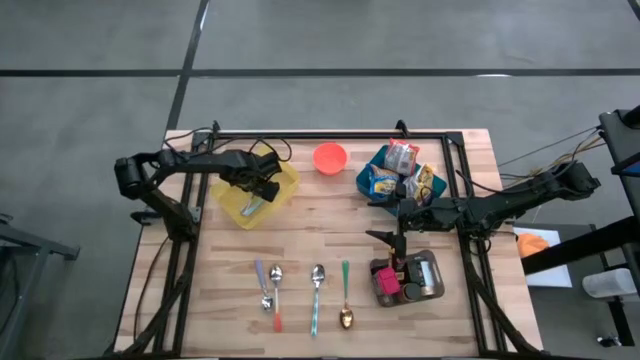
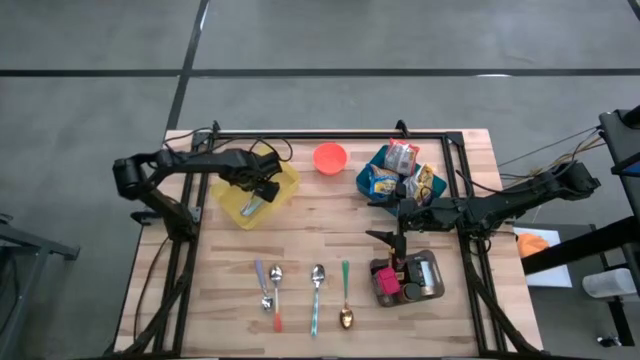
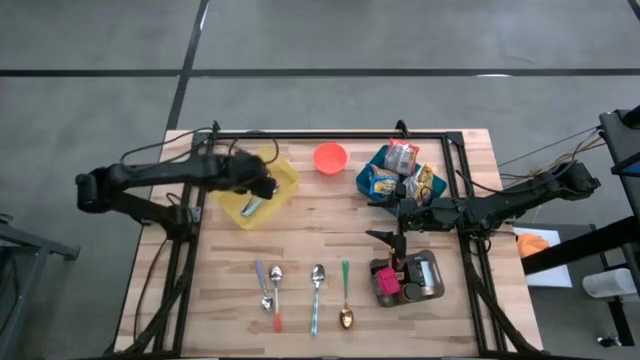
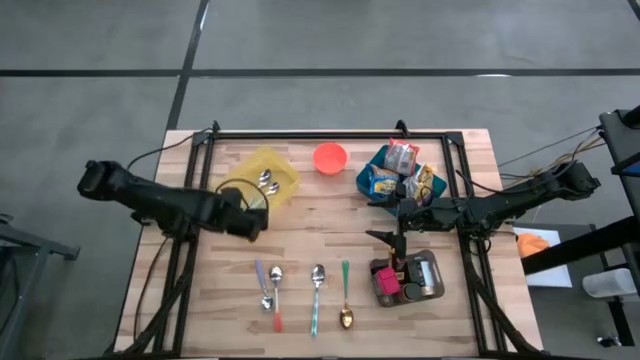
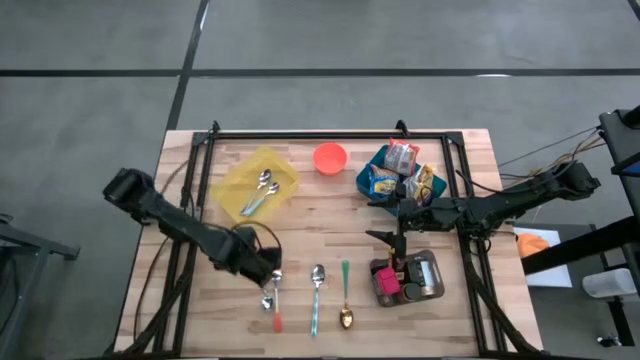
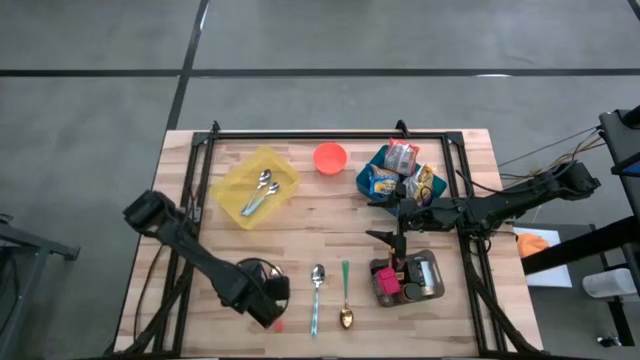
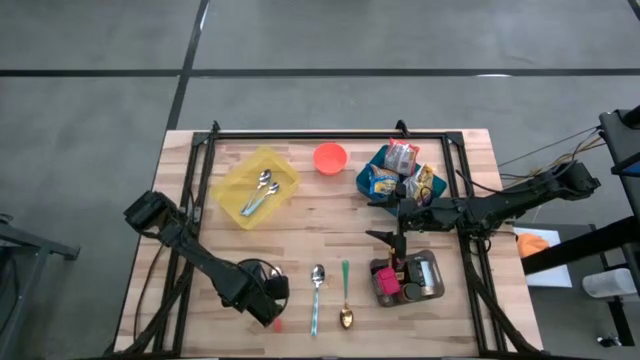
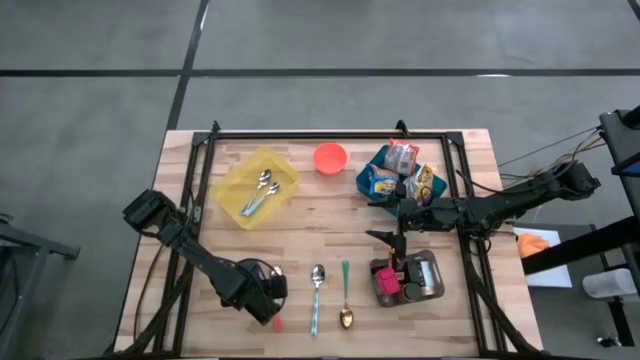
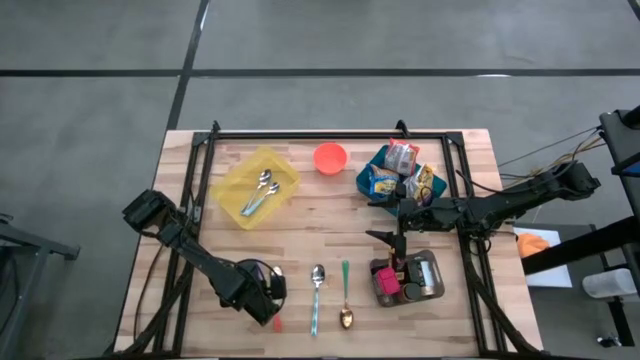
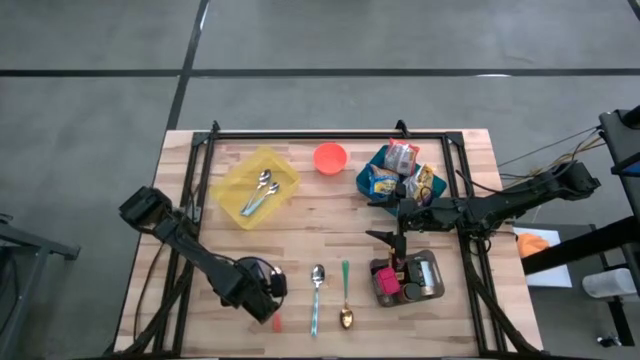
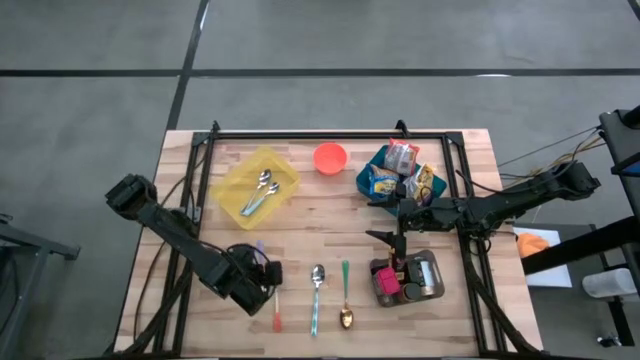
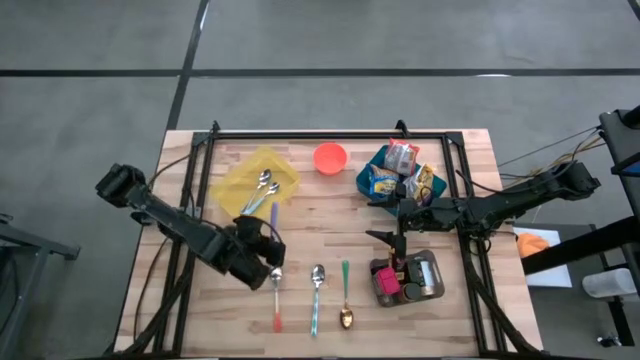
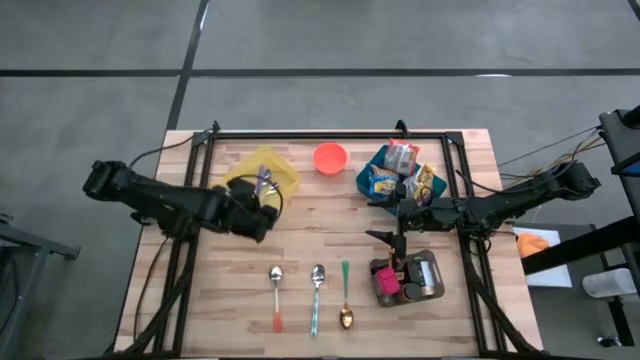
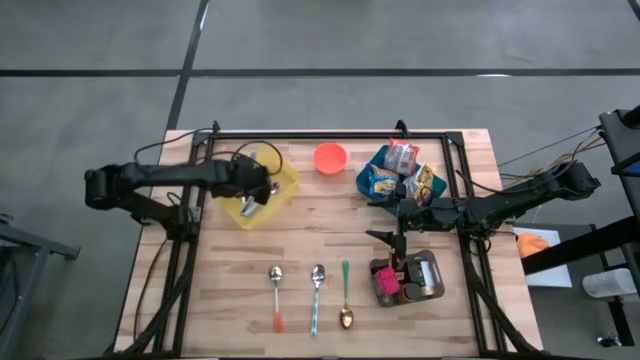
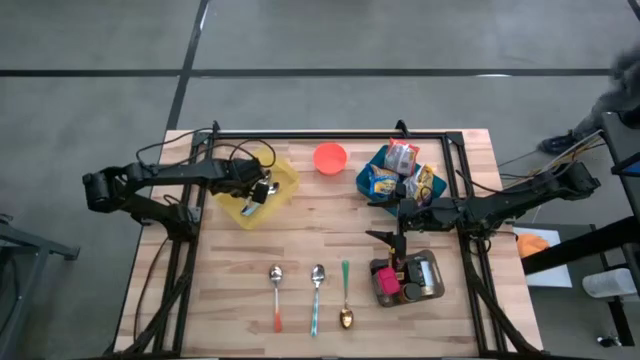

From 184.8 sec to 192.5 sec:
Put the purple spoon into the yellow bin

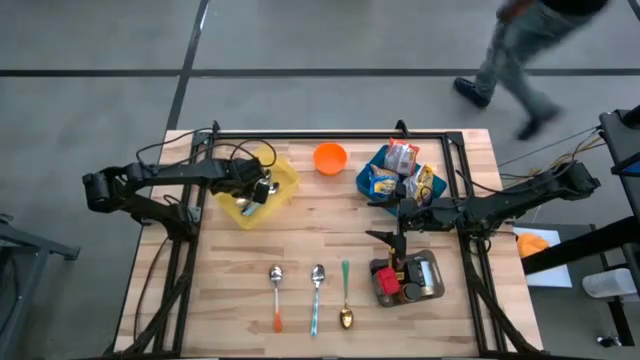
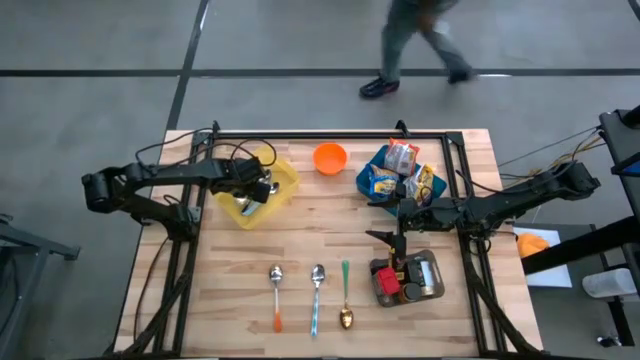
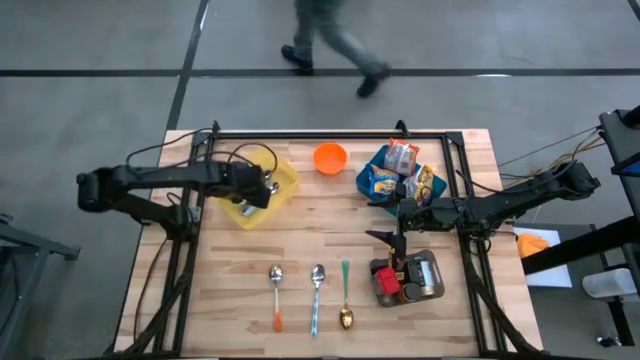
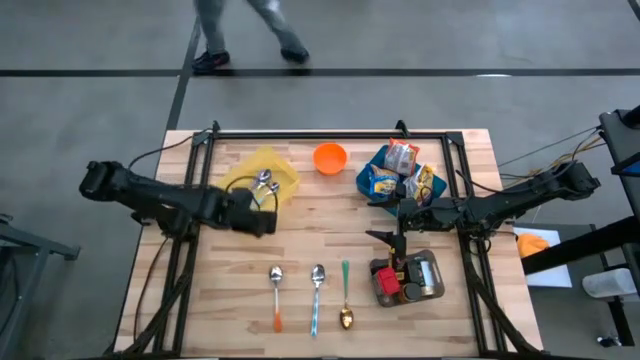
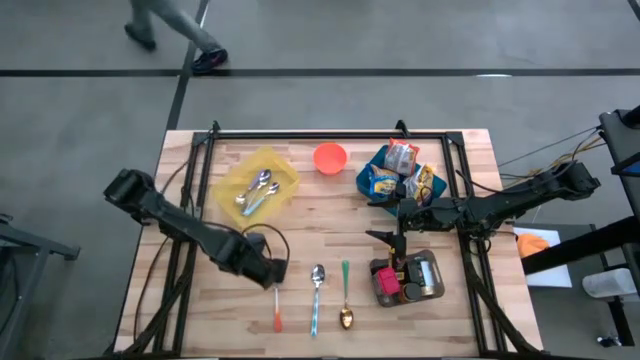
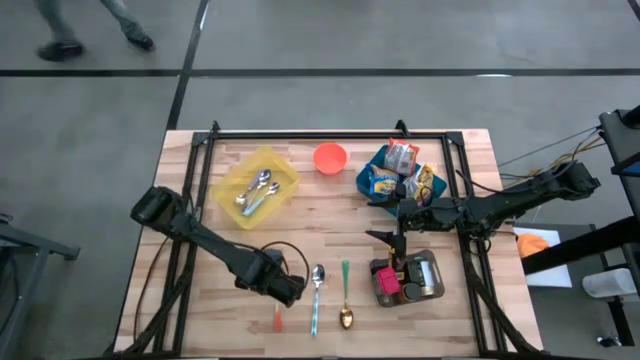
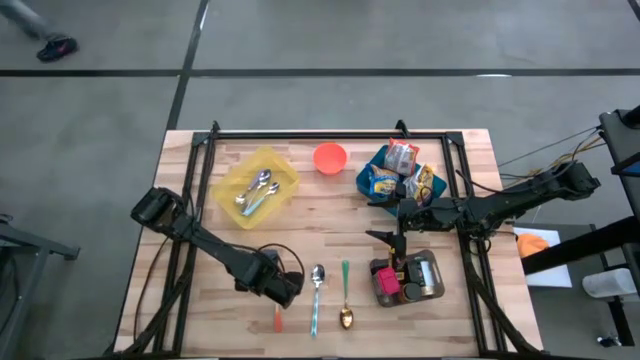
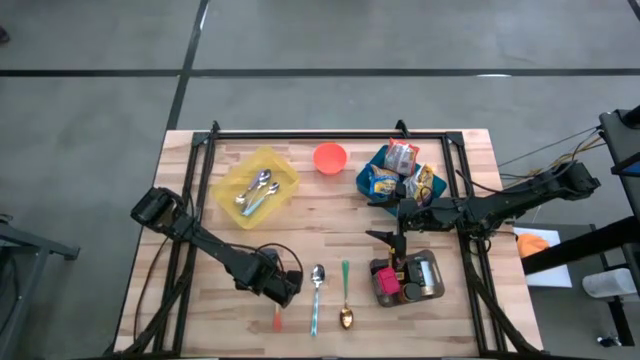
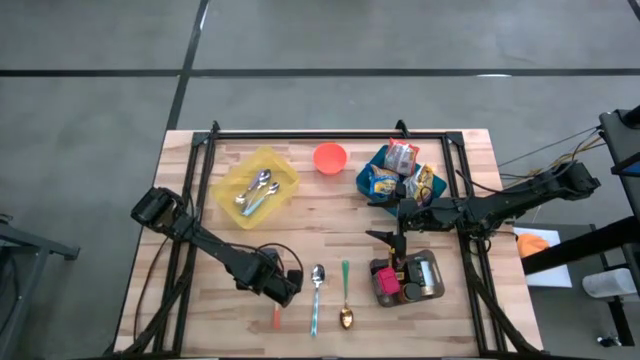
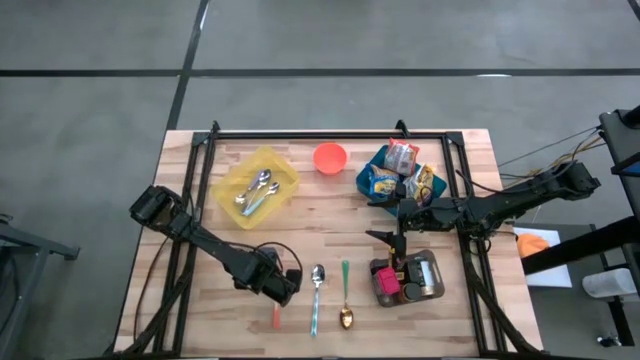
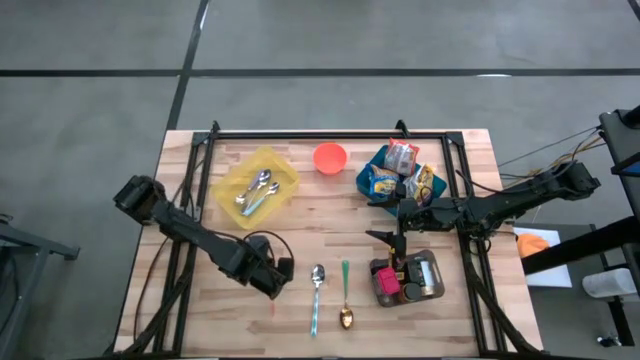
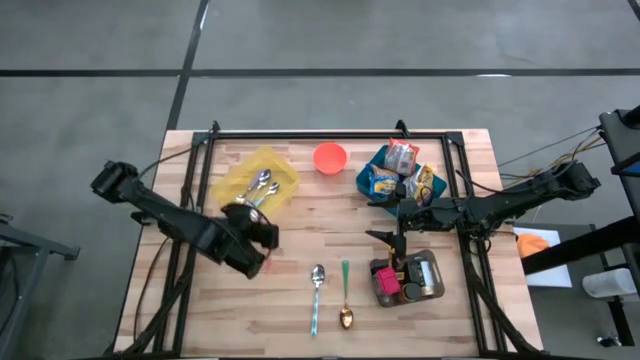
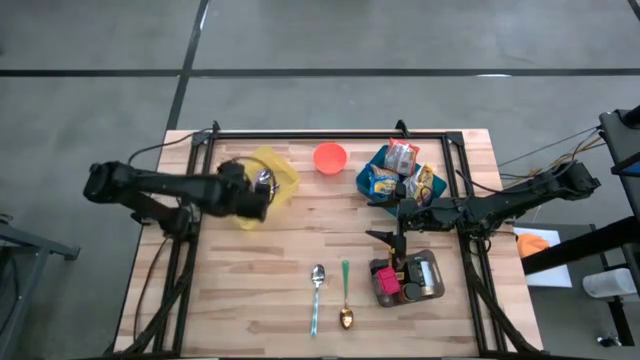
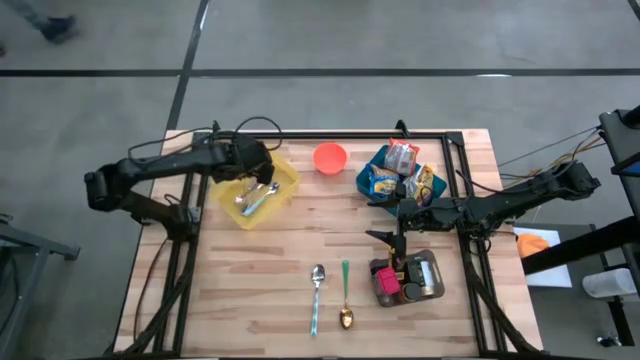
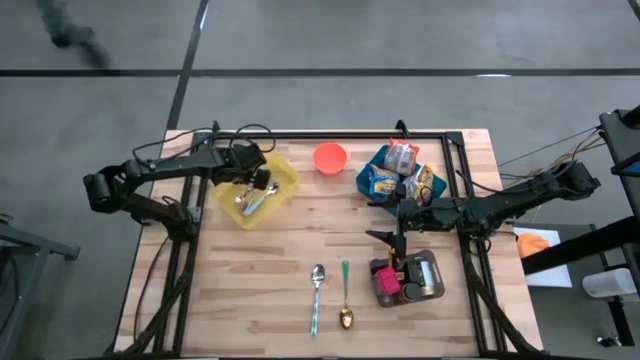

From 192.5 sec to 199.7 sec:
Put the orange spoon into the yellow bin

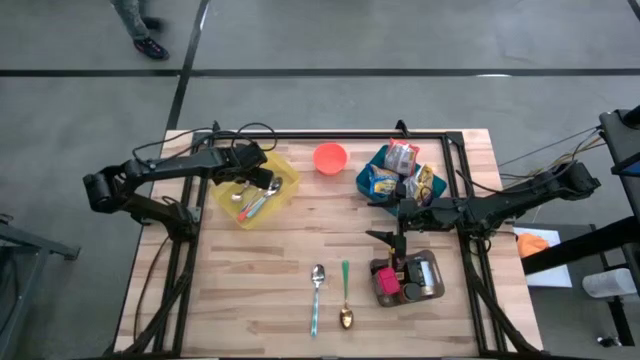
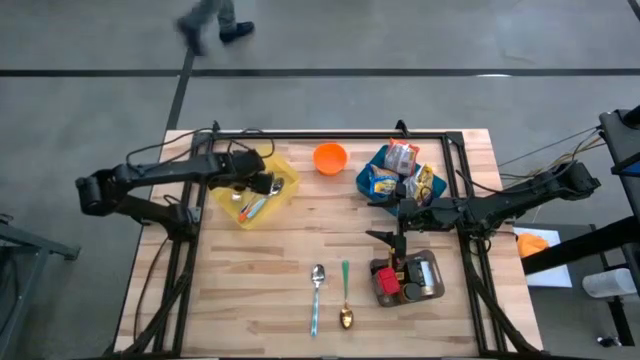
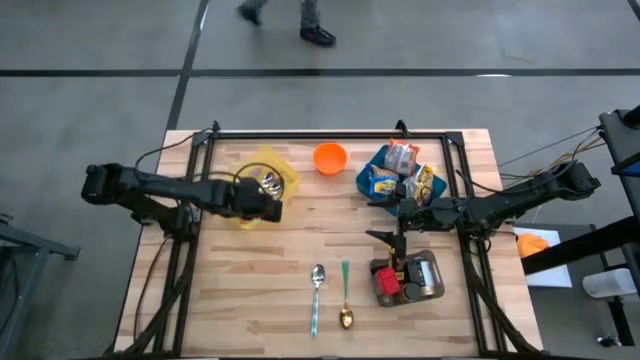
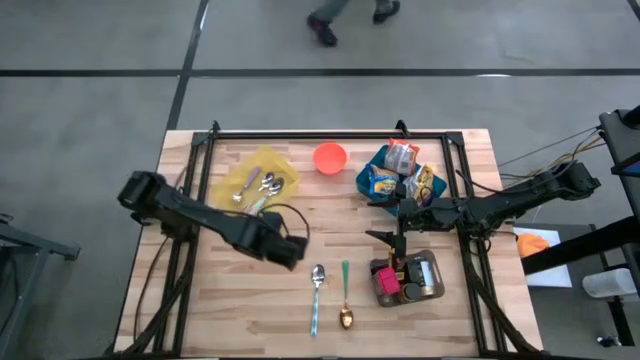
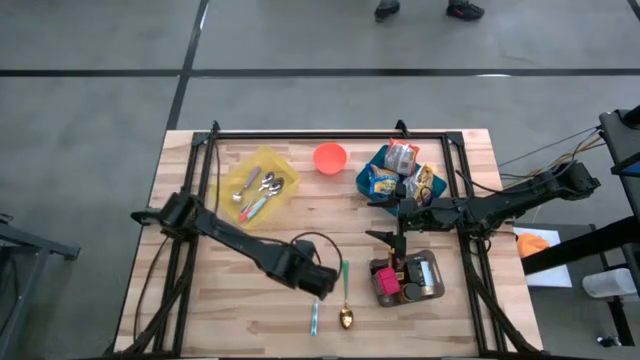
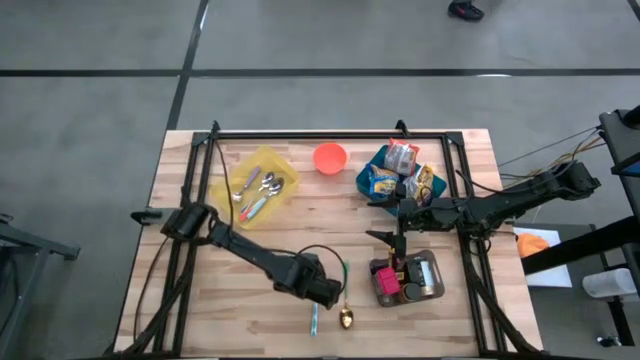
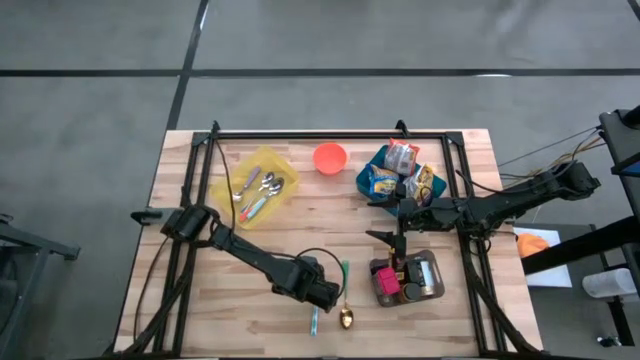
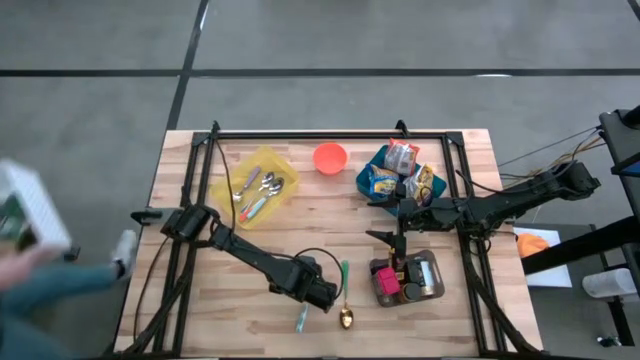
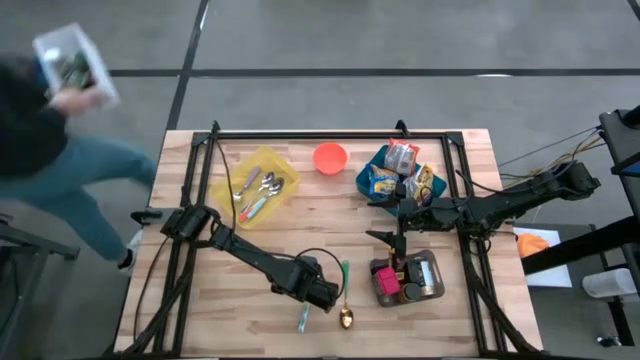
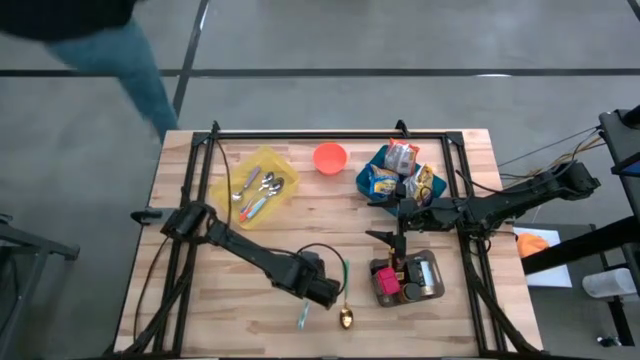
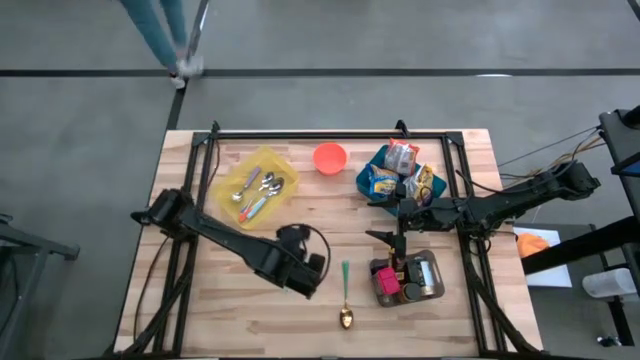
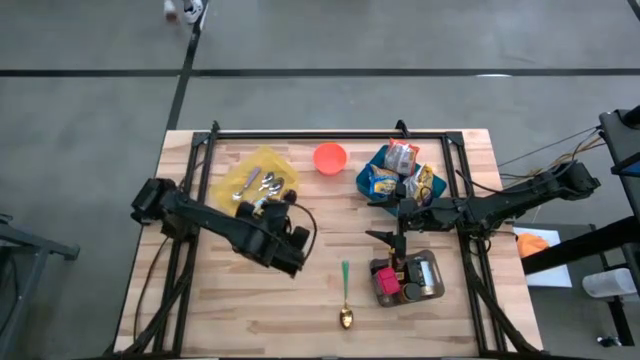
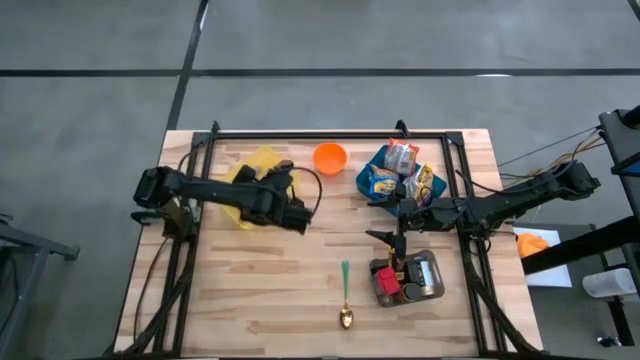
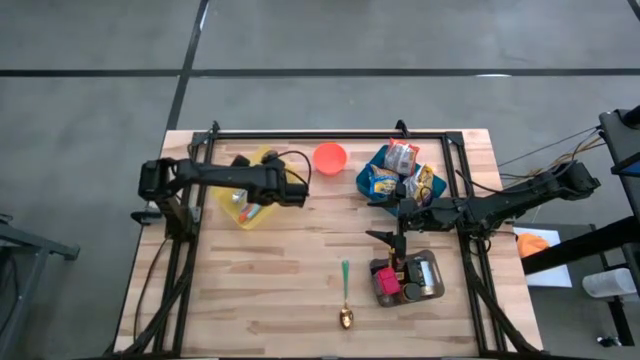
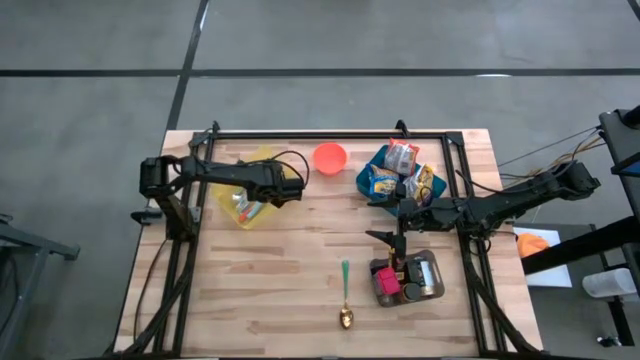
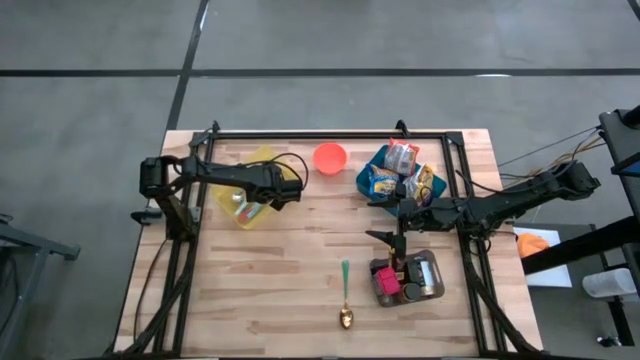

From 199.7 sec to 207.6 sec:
Put the blue patterned spoon into the yellow bin
